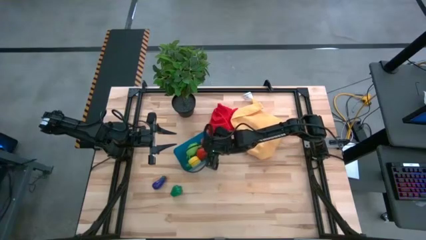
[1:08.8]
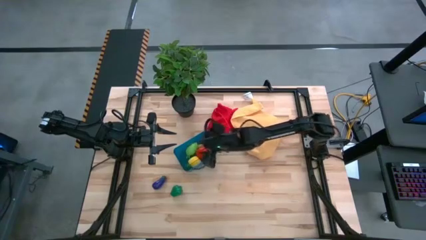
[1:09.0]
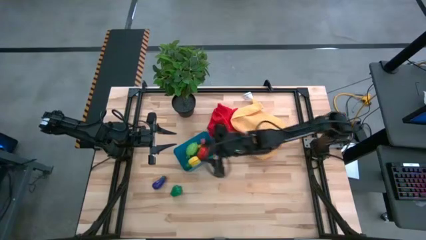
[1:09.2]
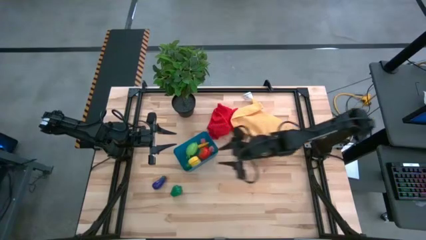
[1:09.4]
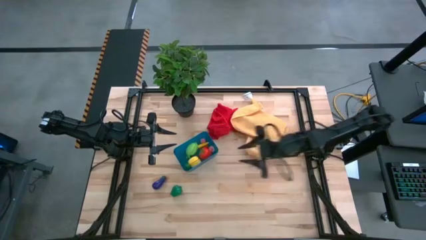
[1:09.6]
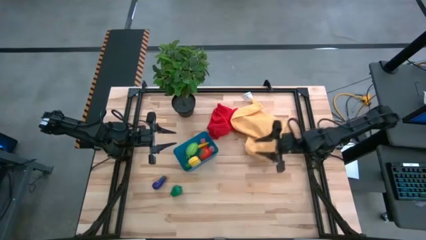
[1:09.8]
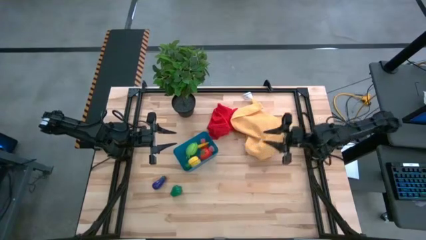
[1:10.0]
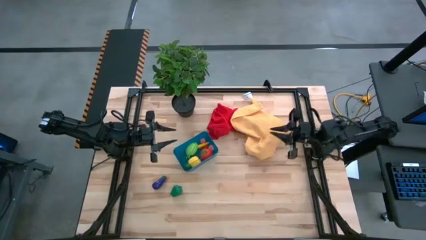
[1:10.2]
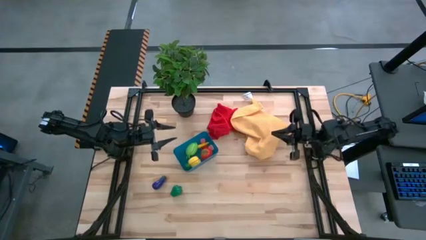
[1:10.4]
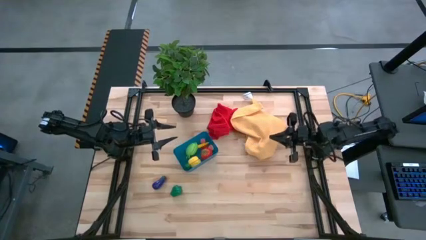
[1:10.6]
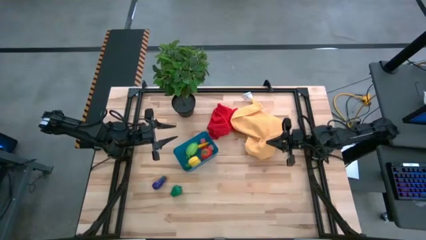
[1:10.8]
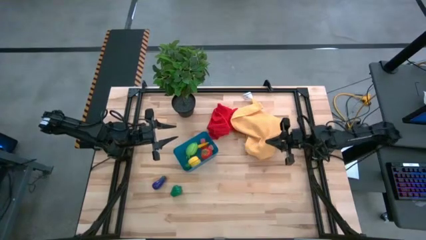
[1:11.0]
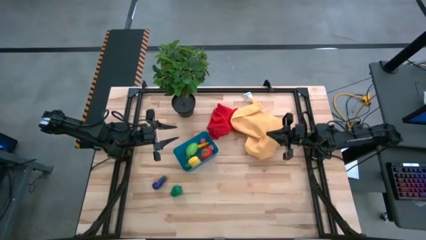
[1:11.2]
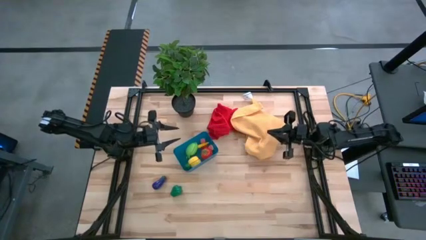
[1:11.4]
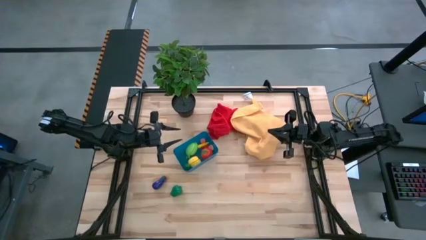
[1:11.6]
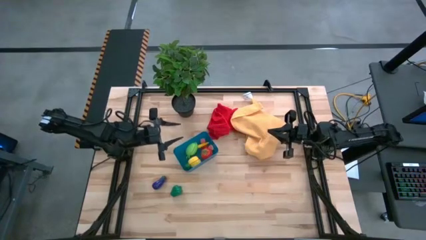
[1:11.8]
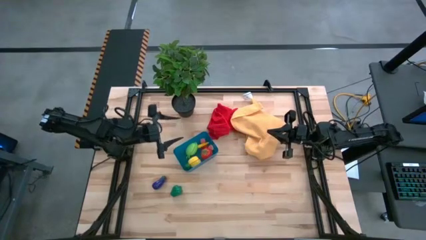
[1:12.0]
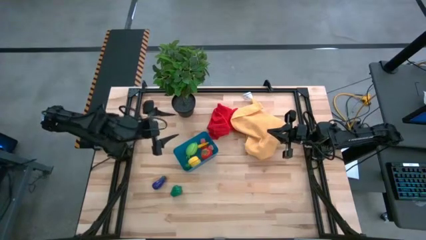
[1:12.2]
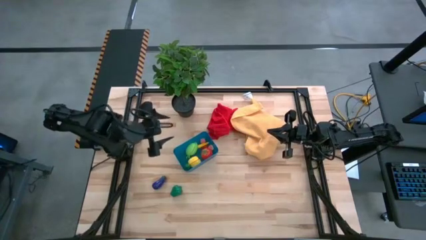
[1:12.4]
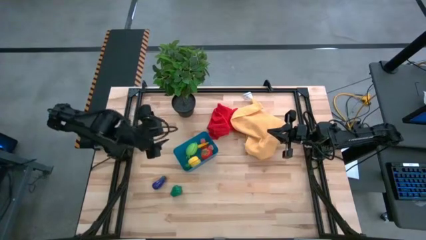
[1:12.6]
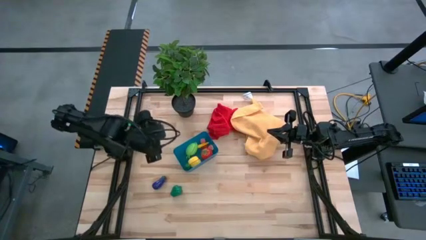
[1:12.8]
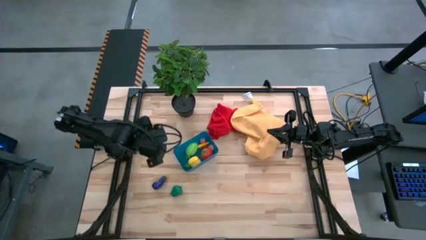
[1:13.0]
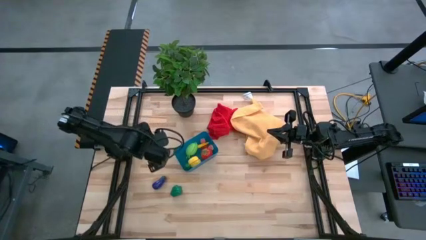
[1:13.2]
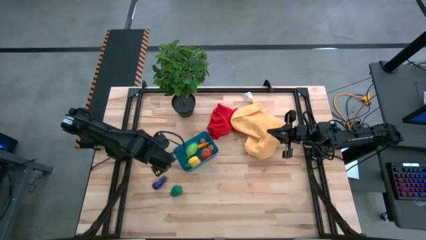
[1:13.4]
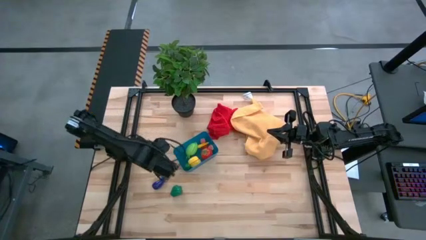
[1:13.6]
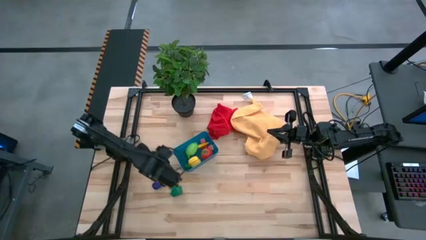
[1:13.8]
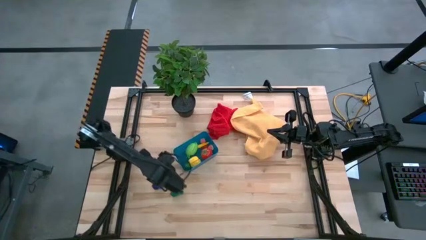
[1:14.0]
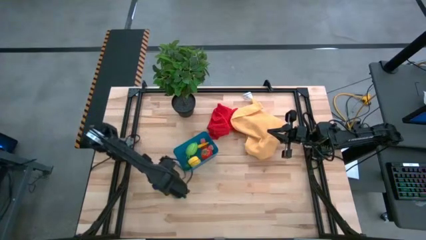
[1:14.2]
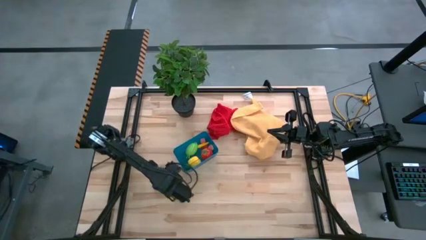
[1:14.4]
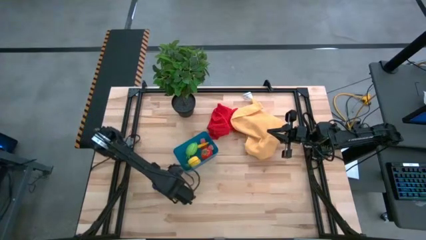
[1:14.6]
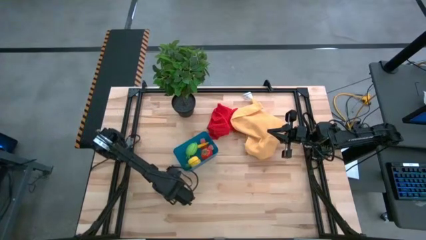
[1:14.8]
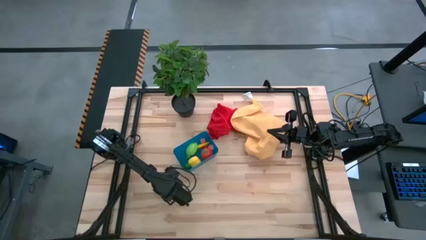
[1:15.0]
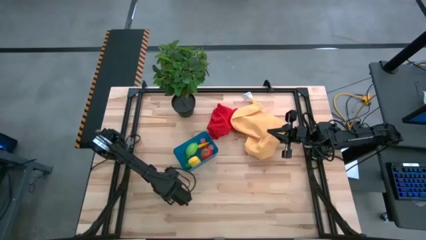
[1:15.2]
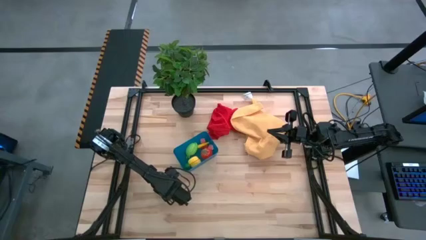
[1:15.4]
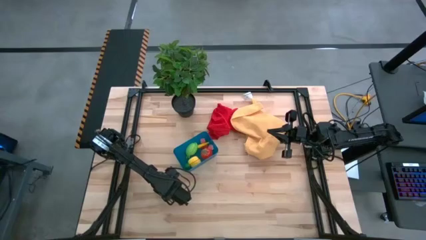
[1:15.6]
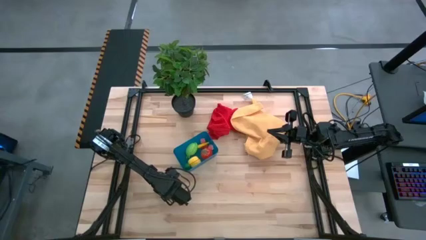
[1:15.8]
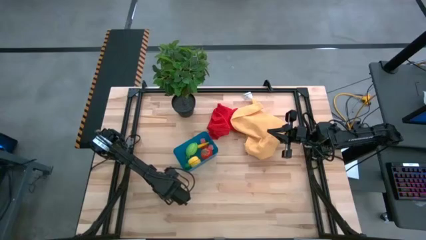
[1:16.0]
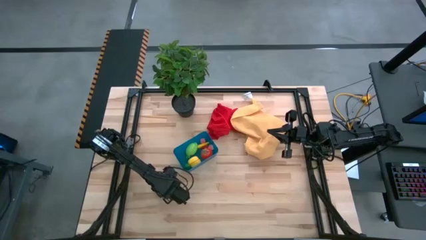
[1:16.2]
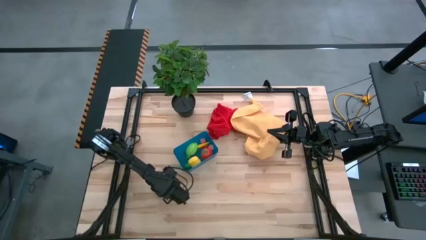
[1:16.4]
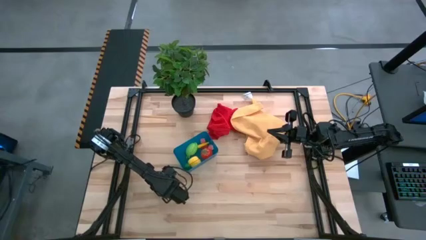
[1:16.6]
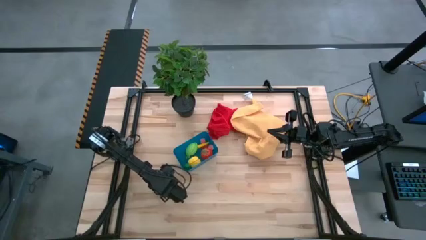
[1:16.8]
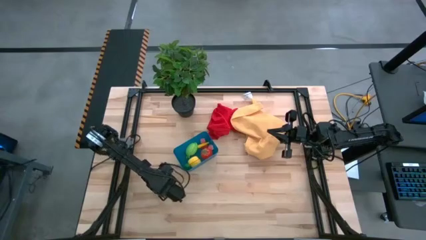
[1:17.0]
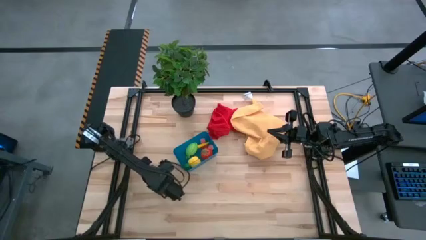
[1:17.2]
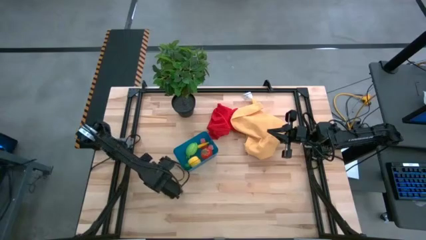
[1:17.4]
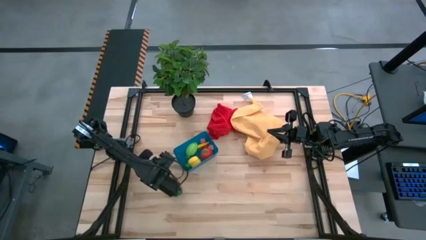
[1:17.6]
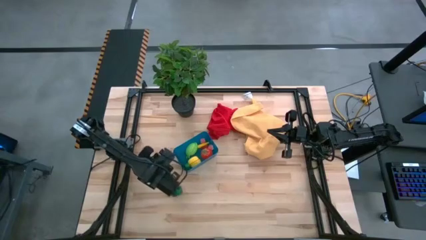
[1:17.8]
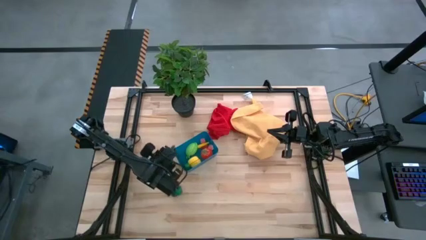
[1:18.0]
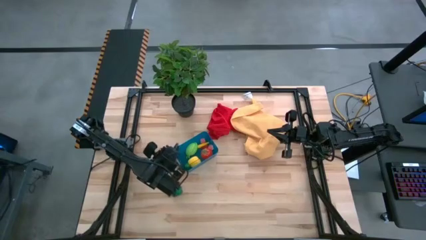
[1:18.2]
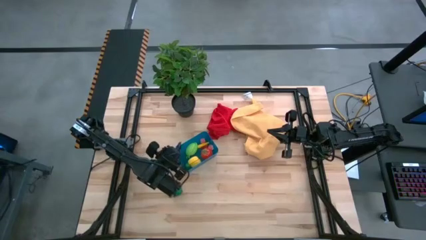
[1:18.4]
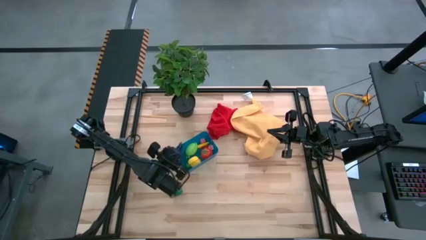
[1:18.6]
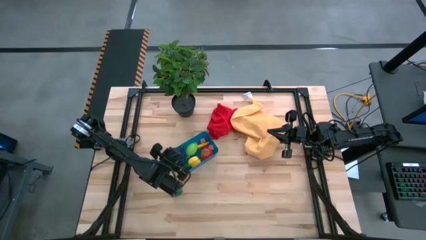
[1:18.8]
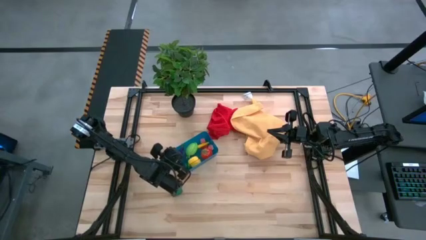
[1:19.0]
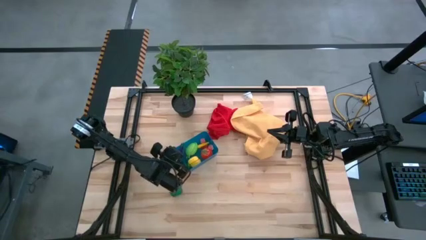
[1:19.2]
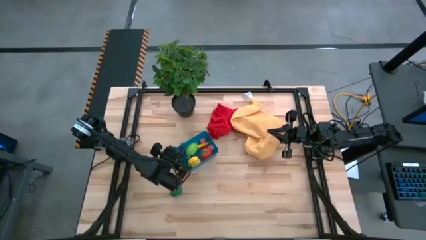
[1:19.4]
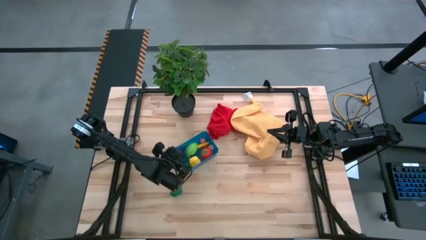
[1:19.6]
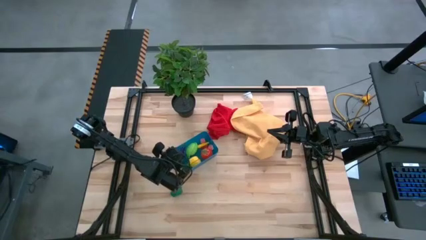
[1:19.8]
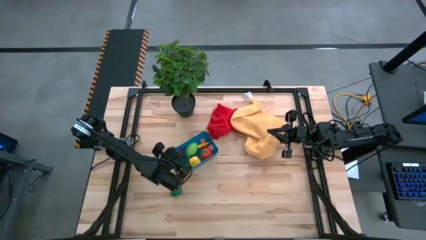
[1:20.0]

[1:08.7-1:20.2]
Task: Pick and placing Produce into tupperware
Put the purple eggplant into the blue bin

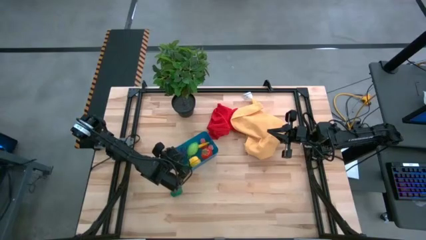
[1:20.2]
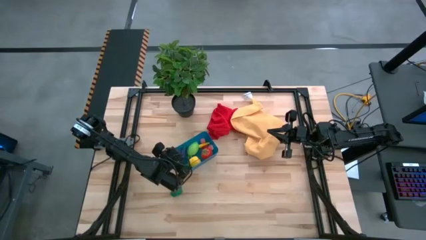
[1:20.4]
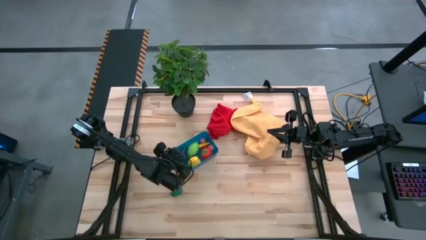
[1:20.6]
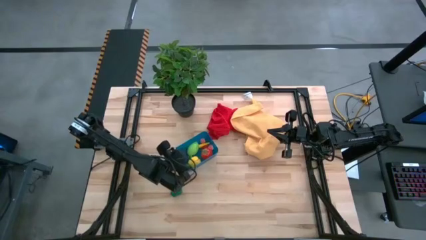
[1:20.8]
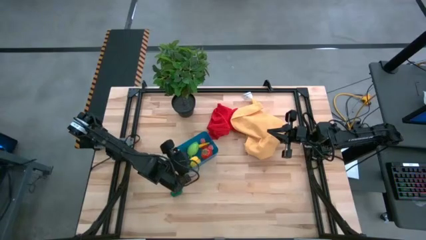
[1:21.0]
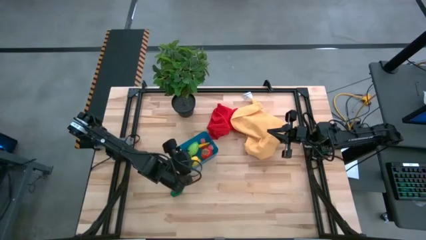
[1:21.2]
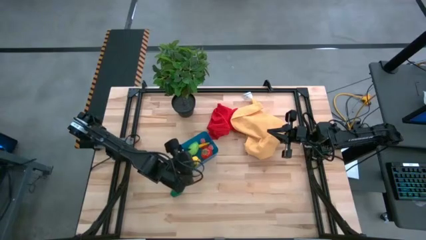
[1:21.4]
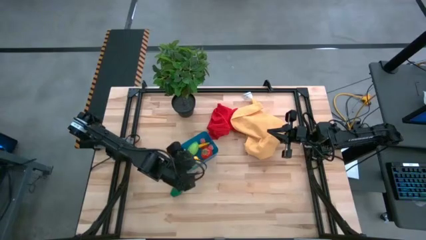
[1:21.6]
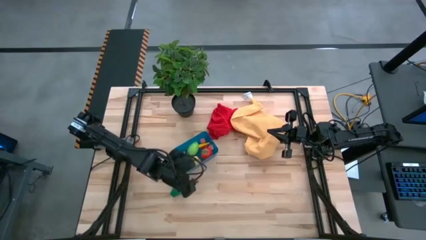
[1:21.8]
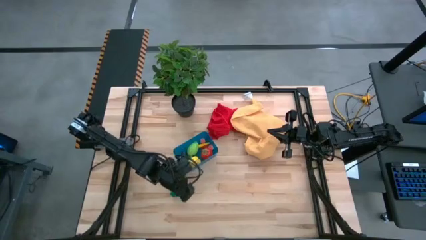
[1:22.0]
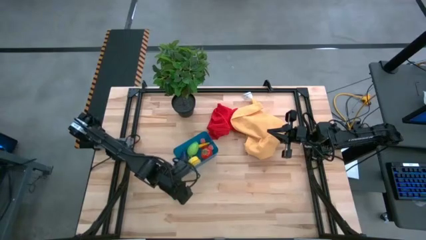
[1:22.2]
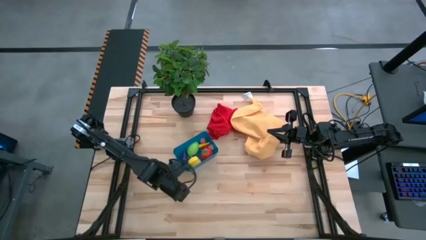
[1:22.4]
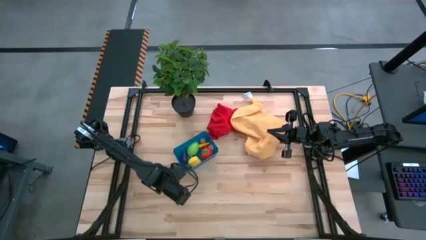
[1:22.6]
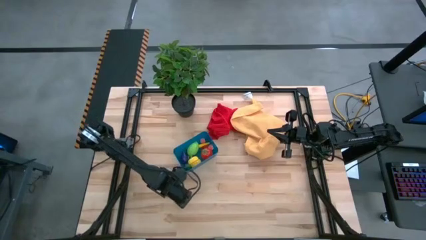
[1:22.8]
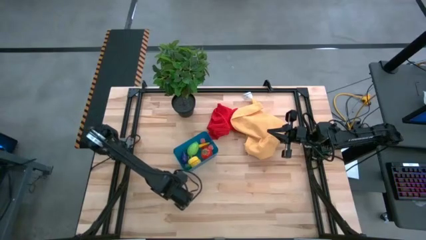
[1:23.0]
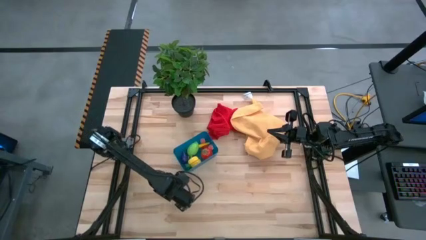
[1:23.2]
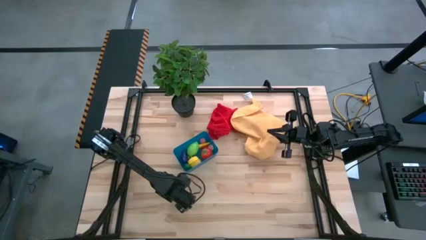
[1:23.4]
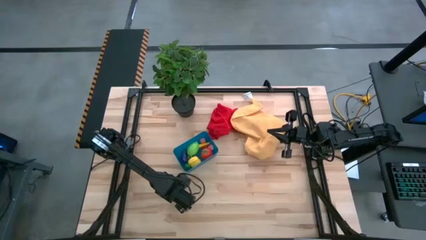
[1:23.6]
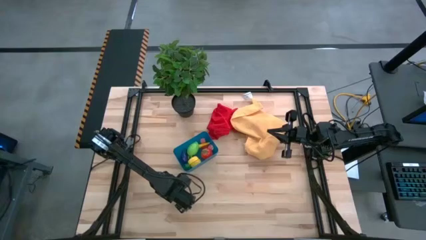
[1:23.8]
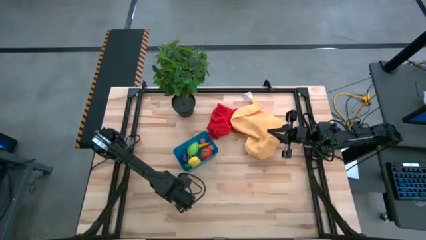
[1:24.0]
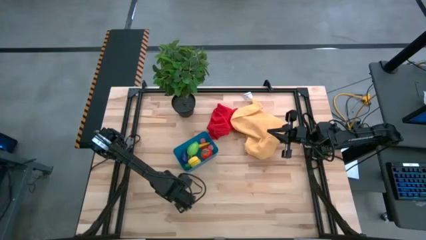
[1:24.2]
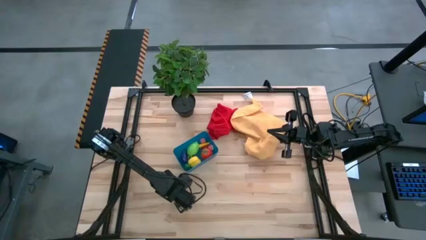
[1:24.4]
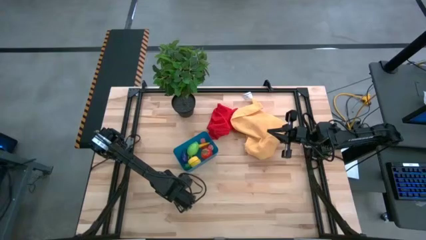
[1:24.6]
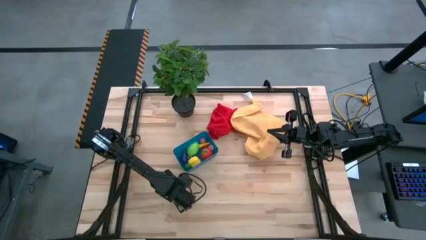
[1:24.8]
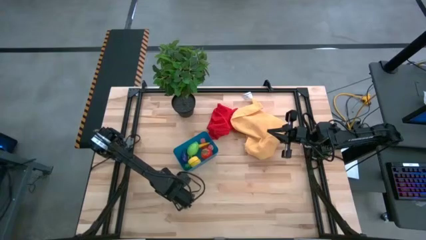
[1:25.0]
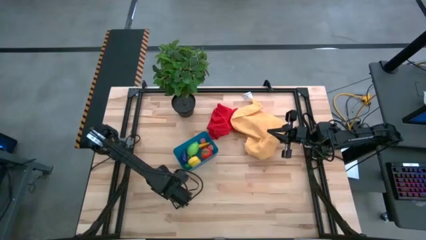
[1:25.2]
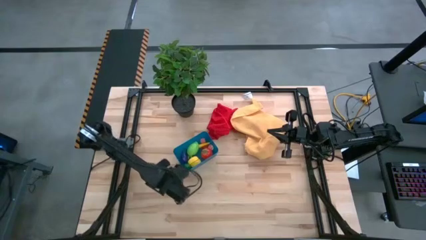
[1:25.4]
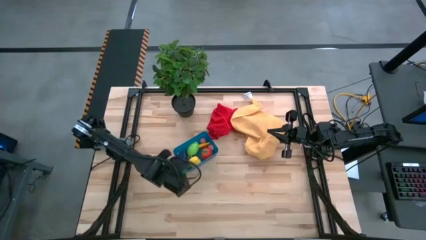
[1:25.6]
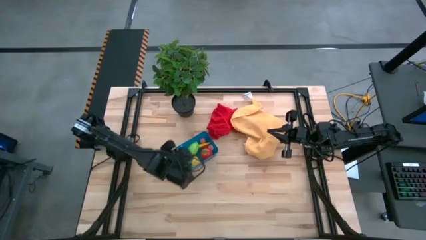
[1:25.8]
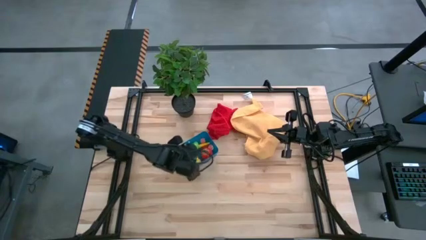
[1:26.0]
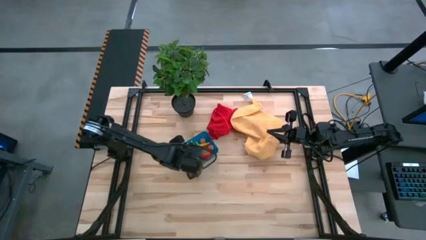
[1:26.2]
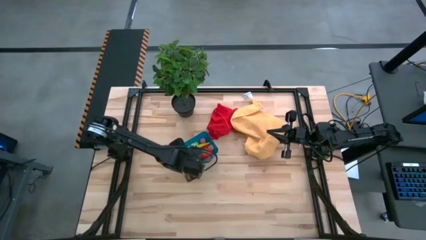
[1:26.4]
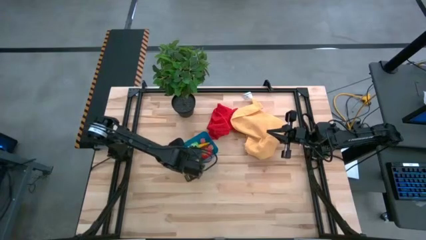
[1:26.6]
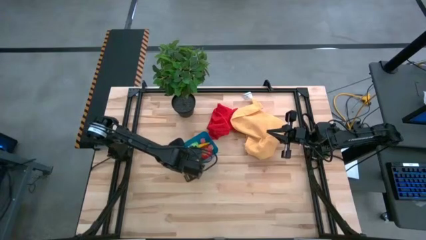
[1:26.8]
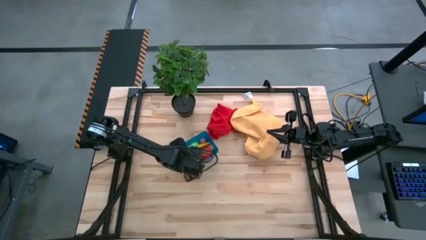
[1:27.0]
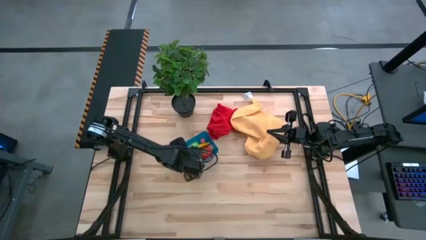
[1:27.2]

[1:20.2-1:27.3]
Put the green bell pepper into the blue bin
